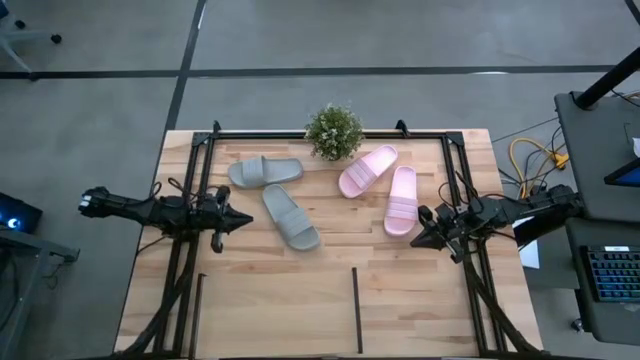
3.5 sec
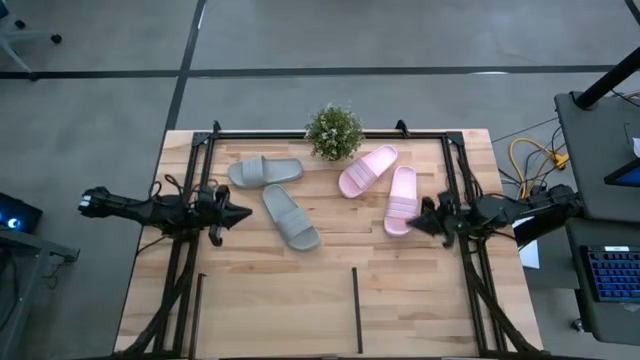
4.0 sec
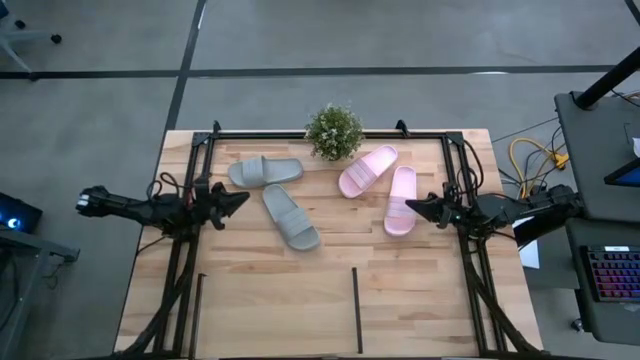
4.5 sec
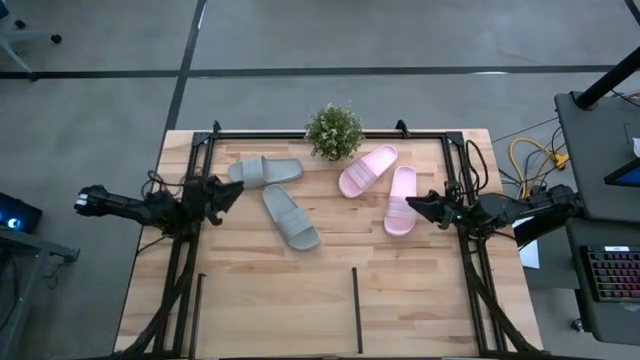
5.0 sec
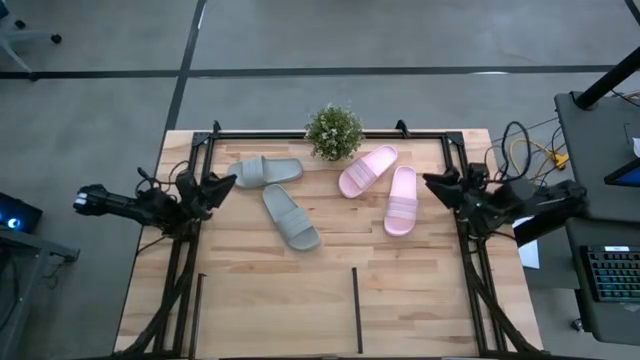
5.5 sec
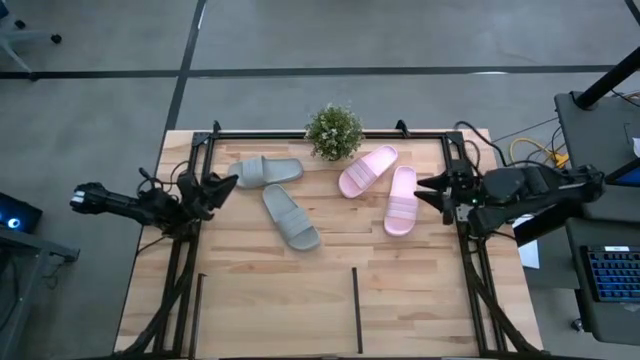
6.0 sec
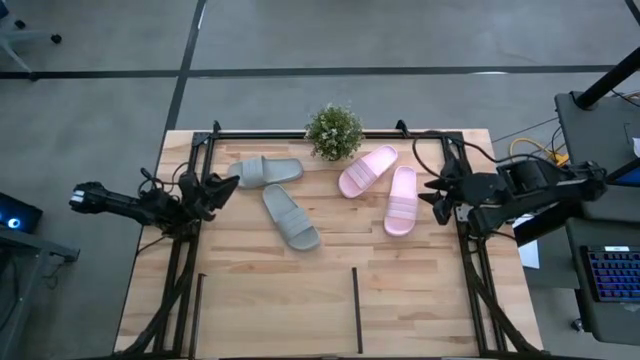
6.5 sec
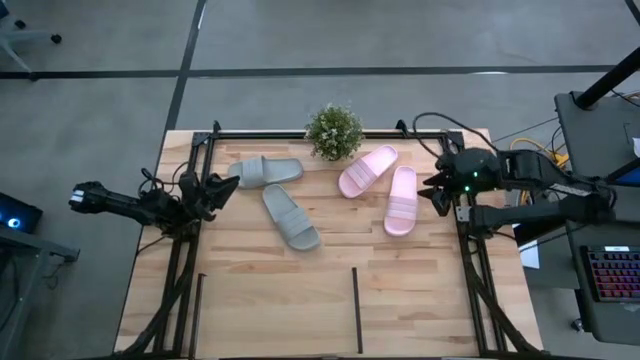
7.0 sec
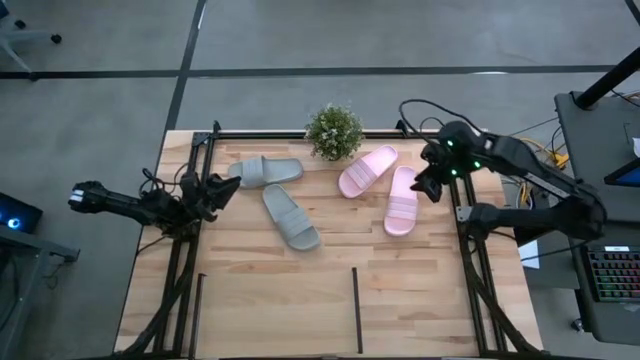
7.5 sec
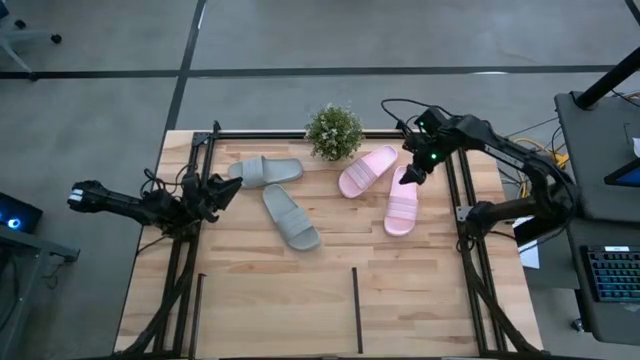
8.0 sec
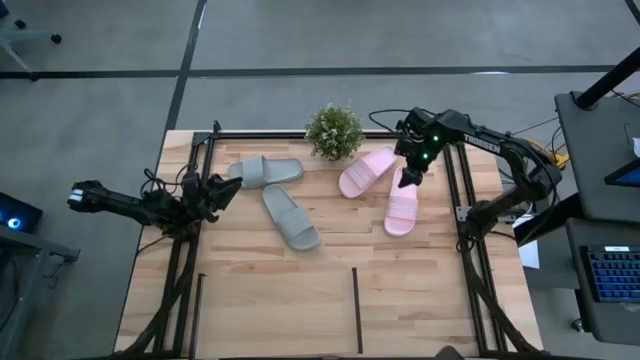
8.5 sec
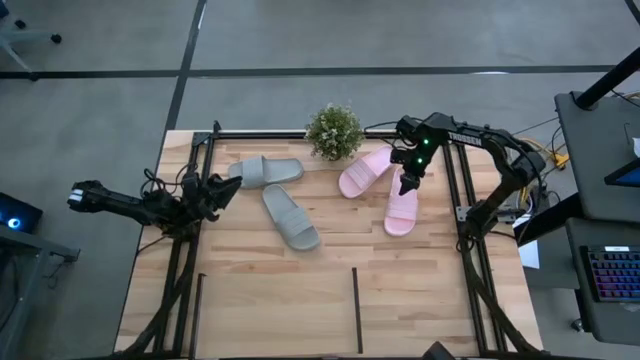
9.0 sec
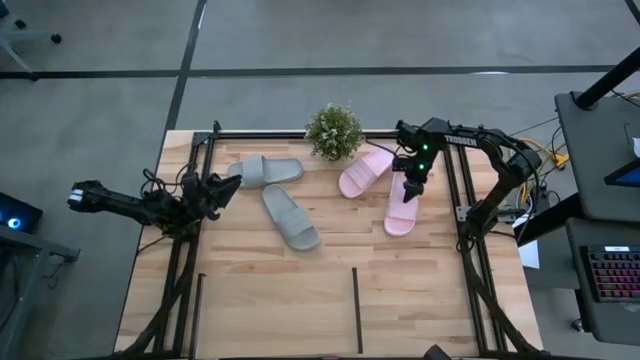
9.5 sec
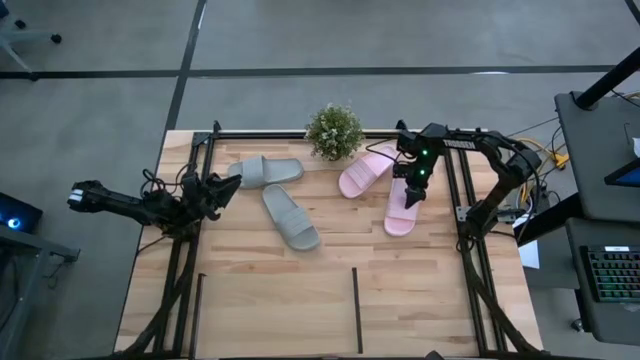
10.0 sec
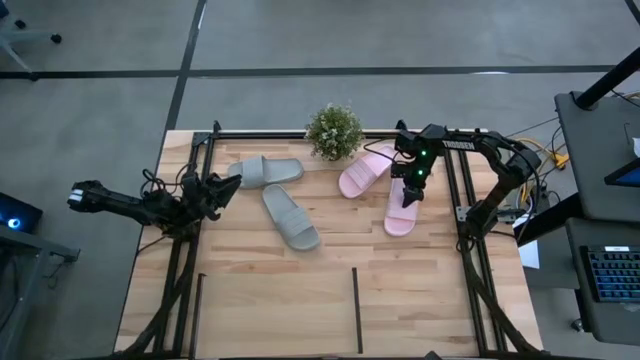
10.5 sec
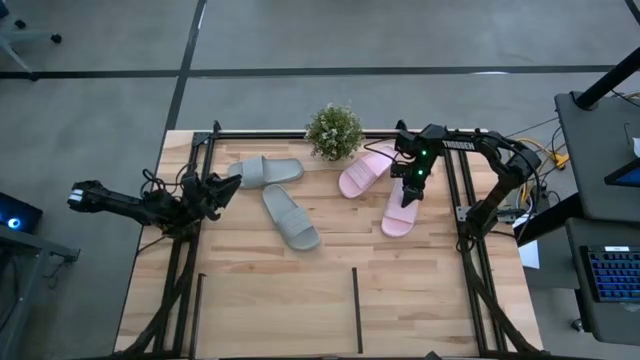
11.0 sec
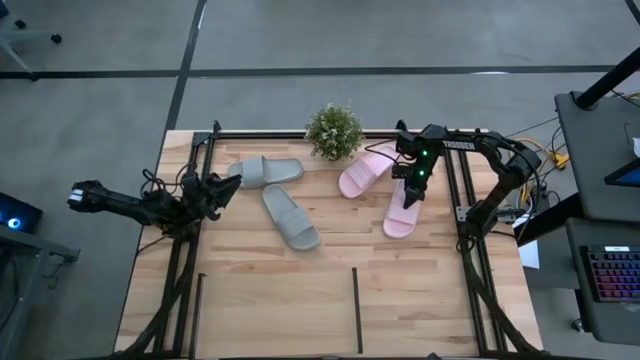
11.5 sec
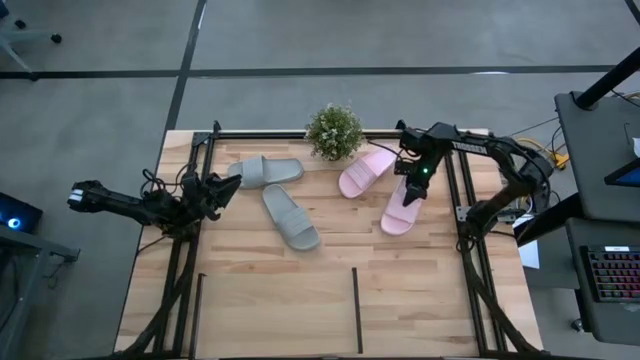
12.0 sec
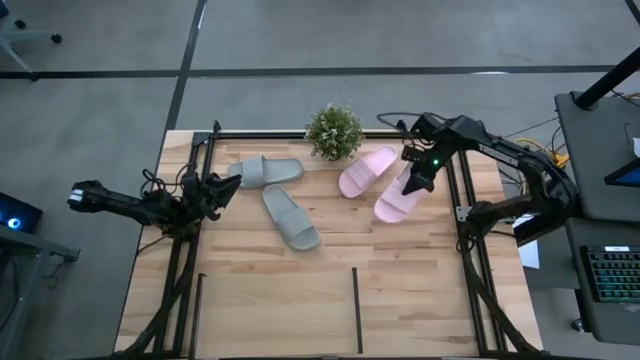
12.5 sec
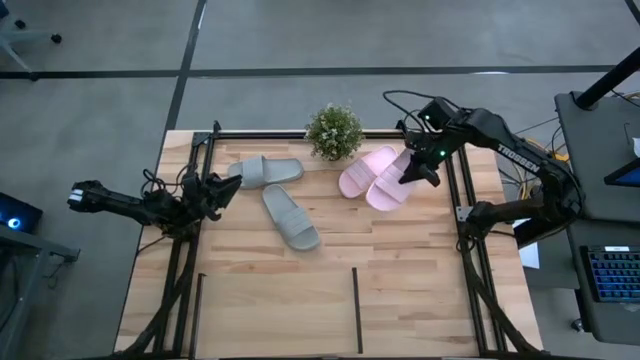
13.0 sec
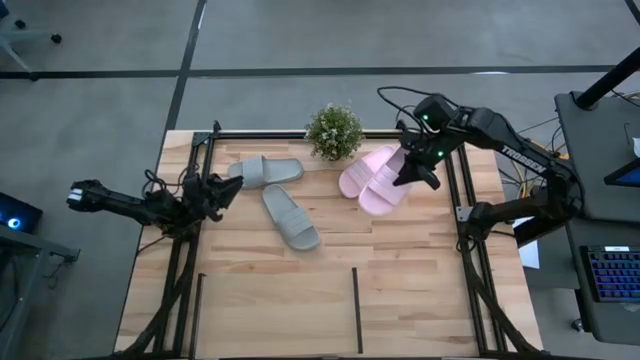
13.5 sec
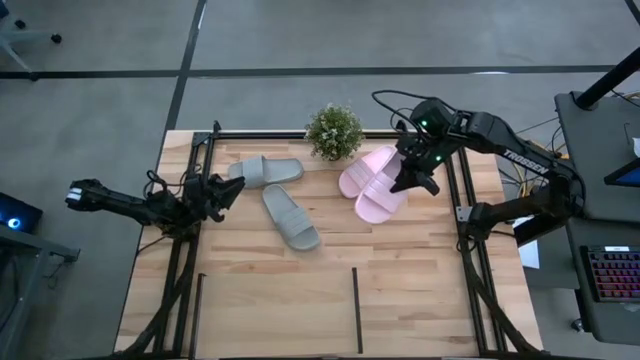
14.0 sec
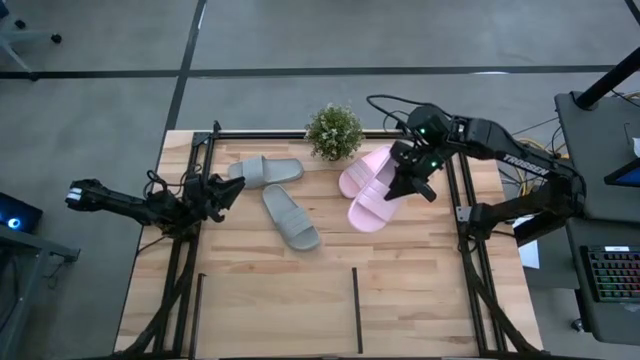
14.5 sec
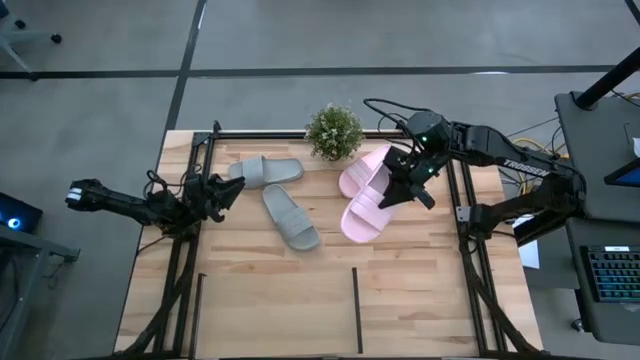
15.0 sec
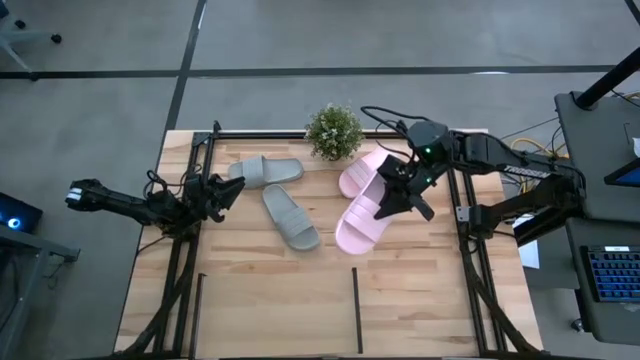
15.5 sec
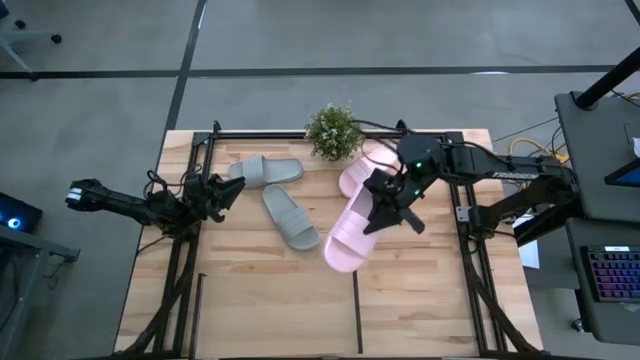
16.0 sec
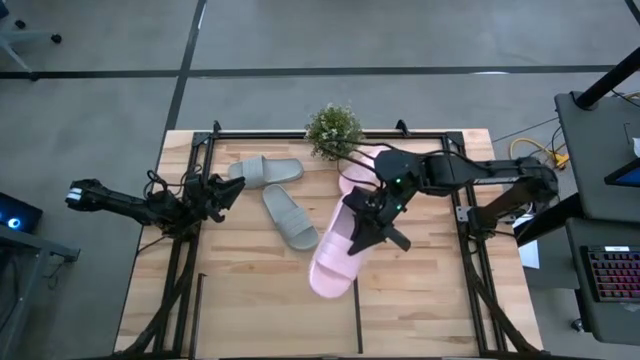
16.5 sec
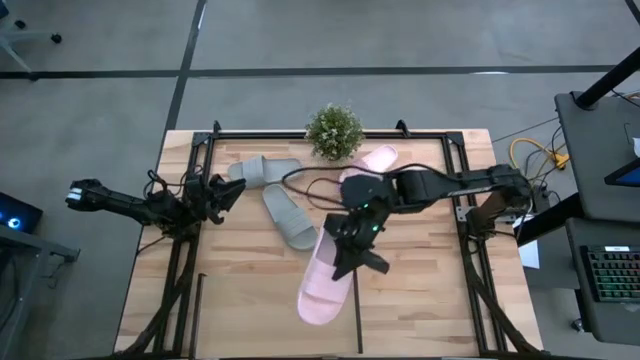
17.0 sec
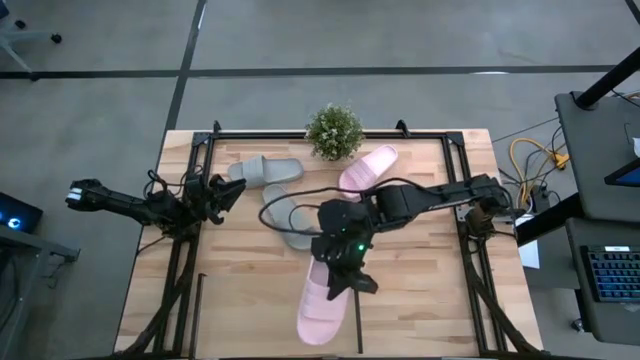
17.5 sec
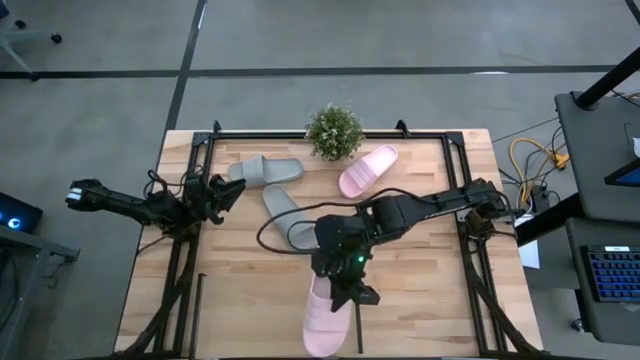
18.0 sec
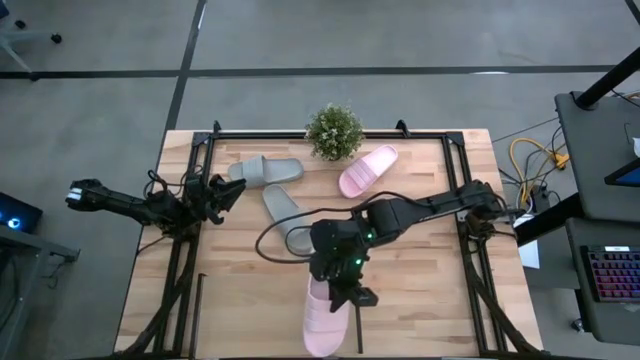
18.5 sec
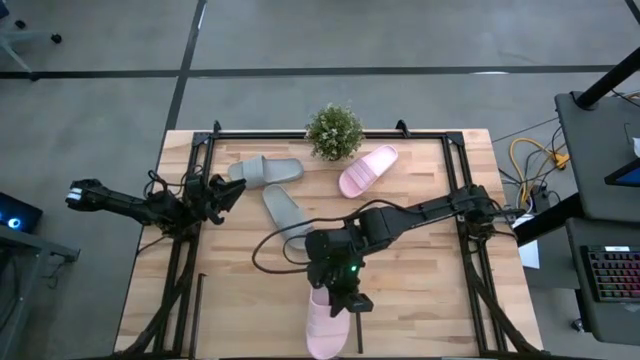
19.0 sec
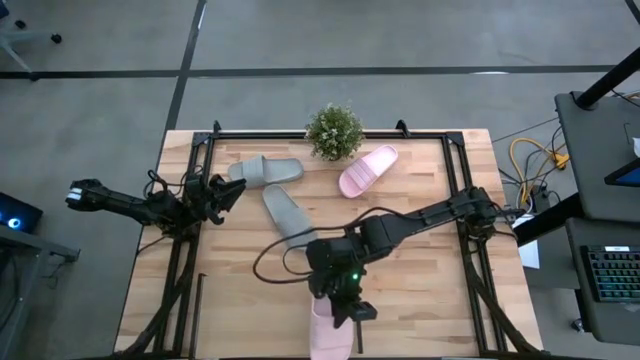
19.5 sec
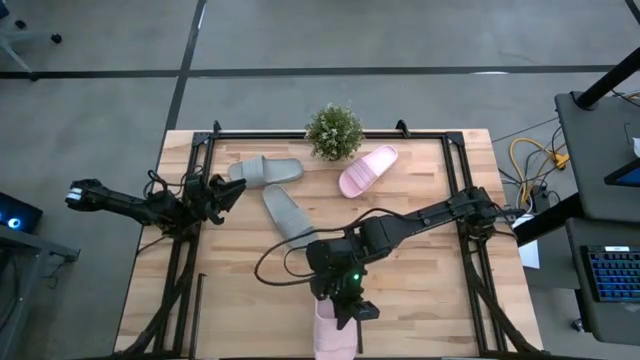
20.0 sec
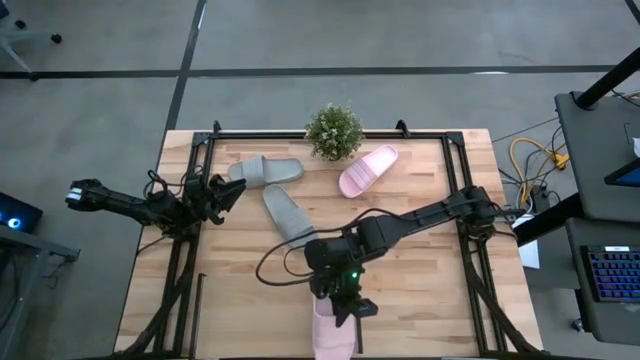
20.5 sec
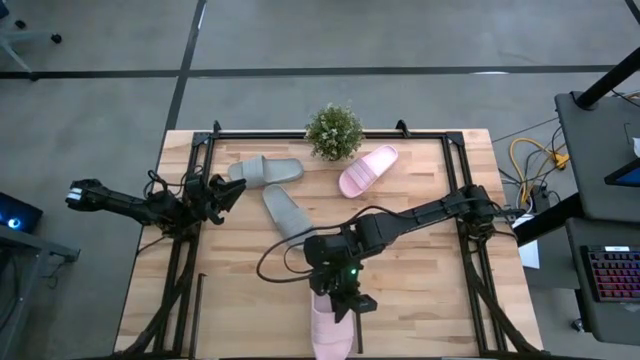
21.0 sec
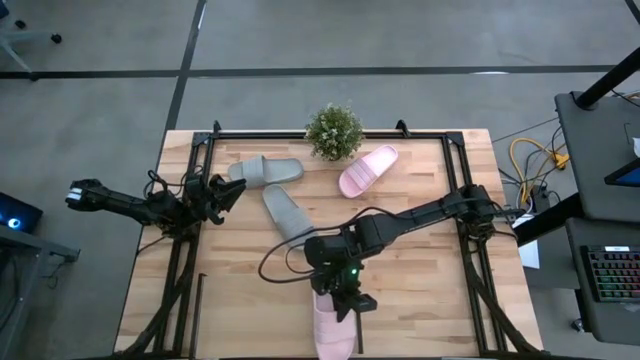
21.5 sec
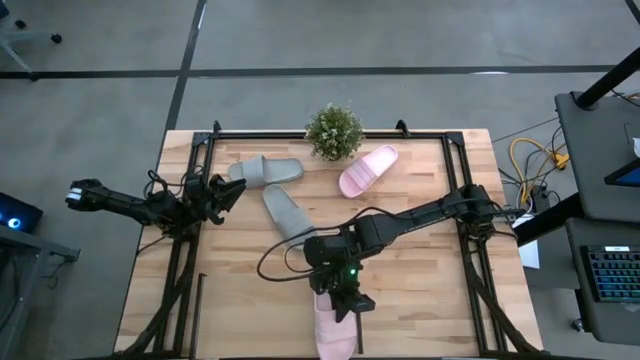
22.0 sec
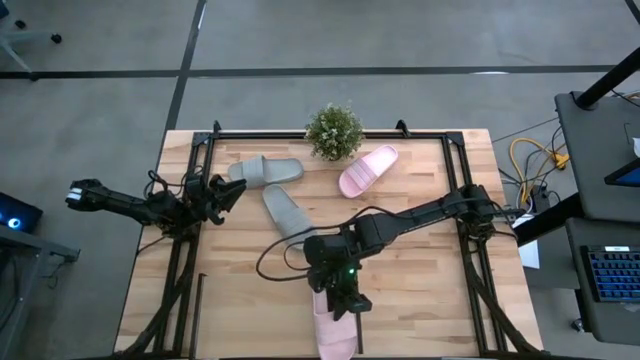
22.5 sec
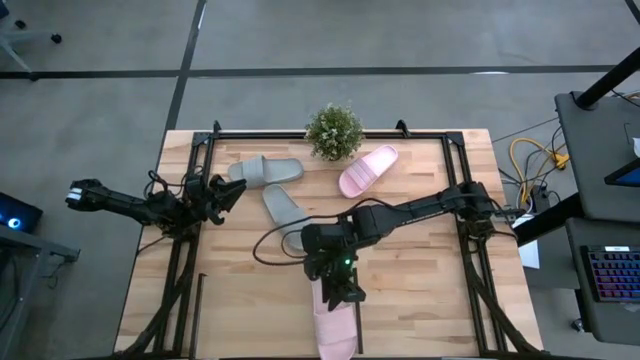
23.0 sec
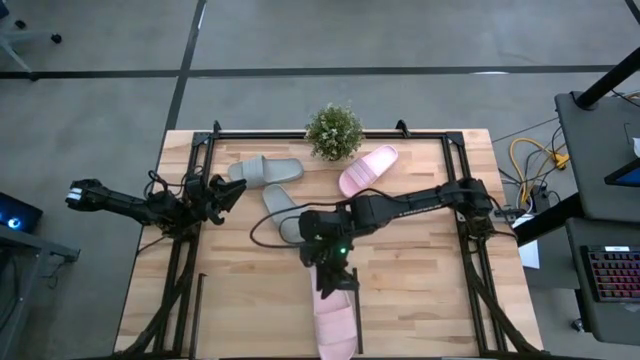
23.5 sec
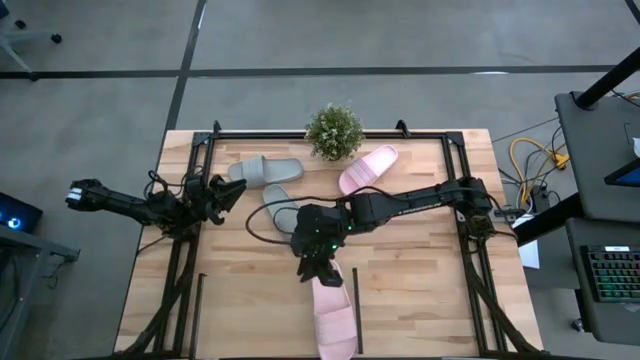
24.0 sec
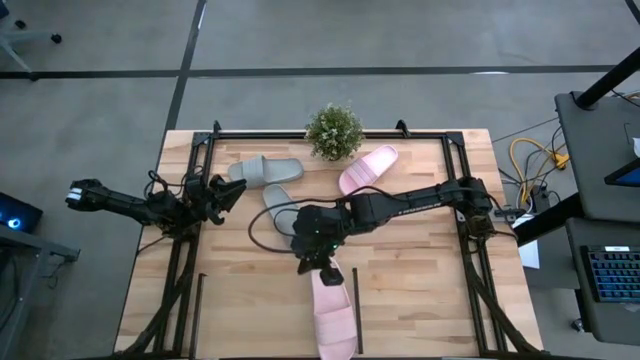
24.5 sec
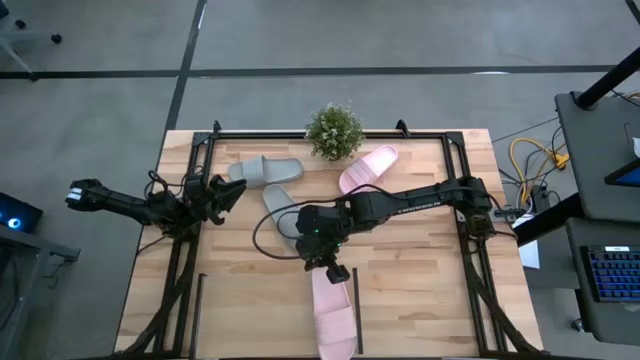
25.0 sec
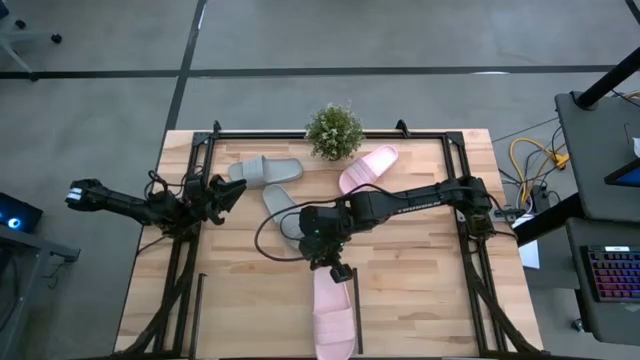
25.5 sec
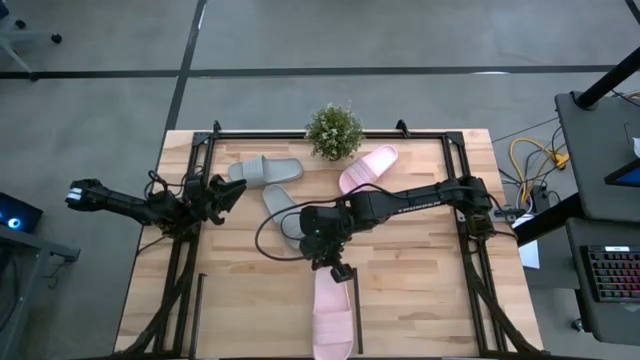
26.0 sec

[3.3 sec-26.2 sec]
Task: Pick and place slides into the shelf
Put the bottom pink slipper on the shelf
